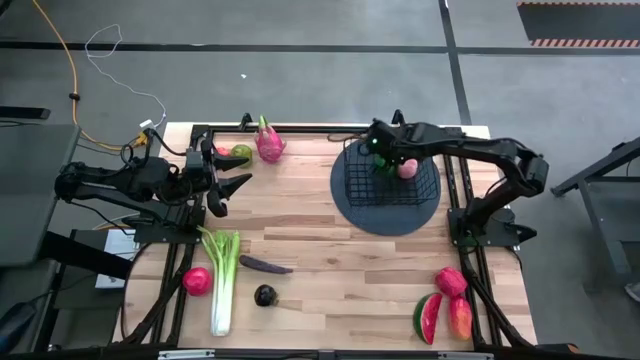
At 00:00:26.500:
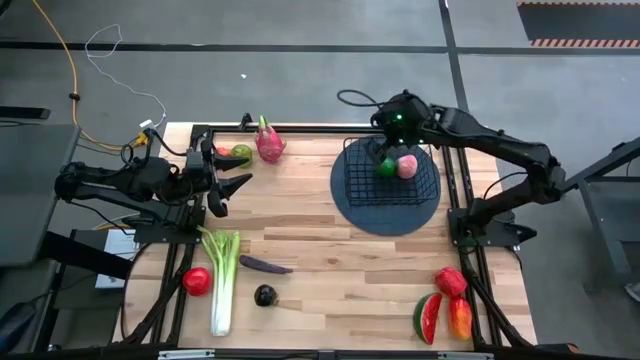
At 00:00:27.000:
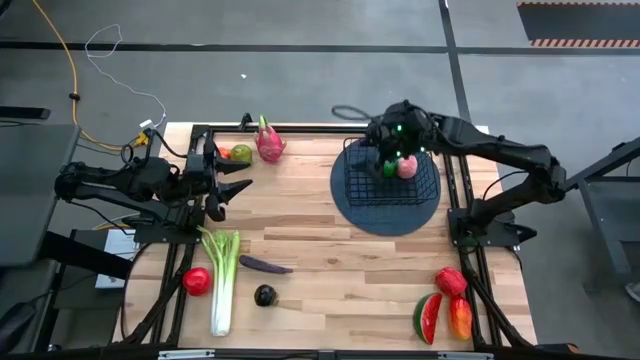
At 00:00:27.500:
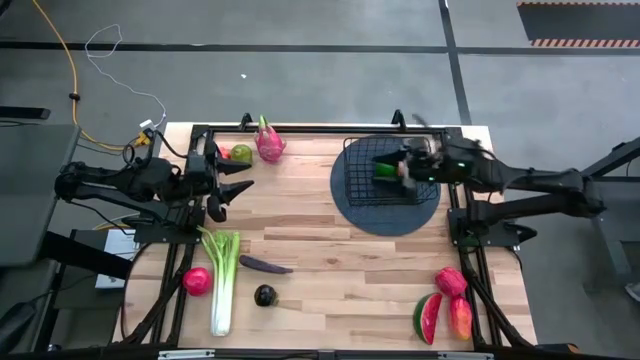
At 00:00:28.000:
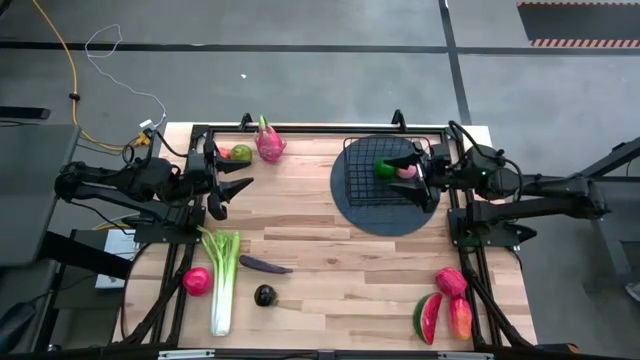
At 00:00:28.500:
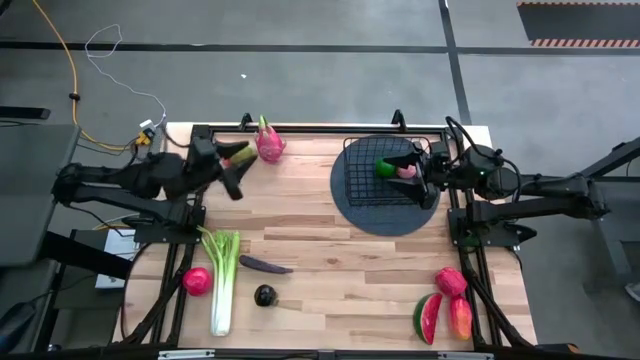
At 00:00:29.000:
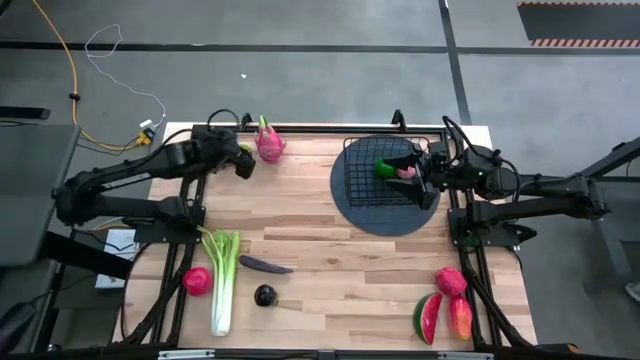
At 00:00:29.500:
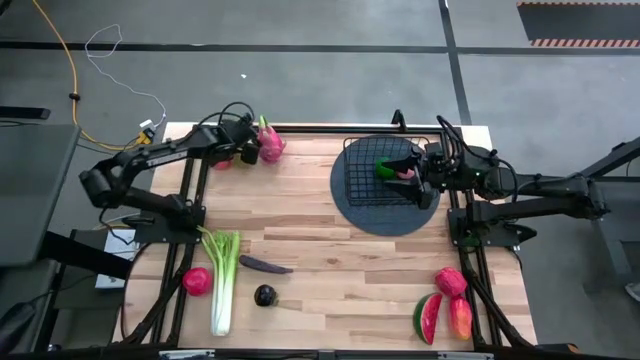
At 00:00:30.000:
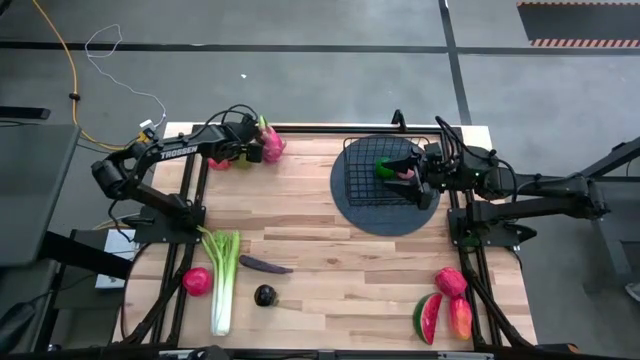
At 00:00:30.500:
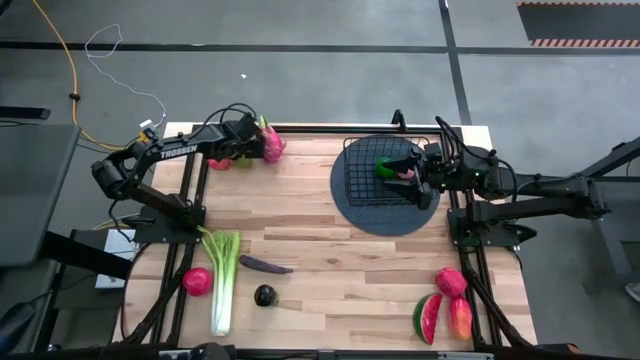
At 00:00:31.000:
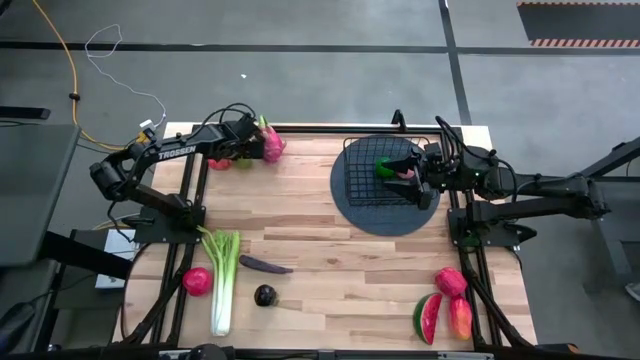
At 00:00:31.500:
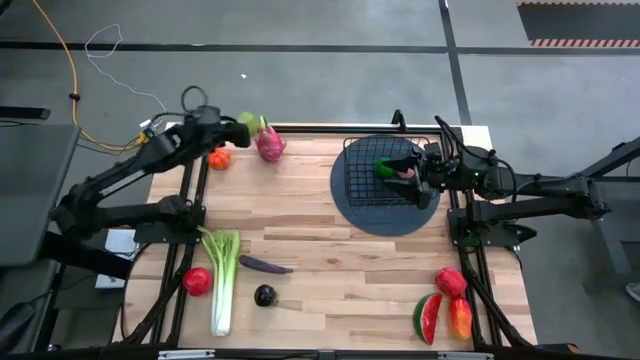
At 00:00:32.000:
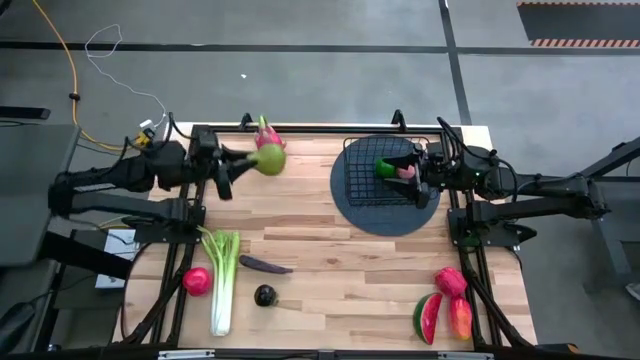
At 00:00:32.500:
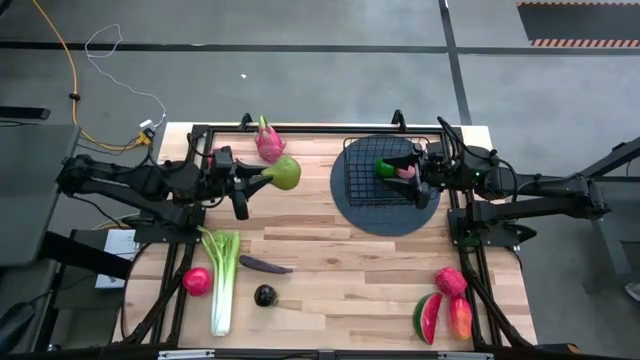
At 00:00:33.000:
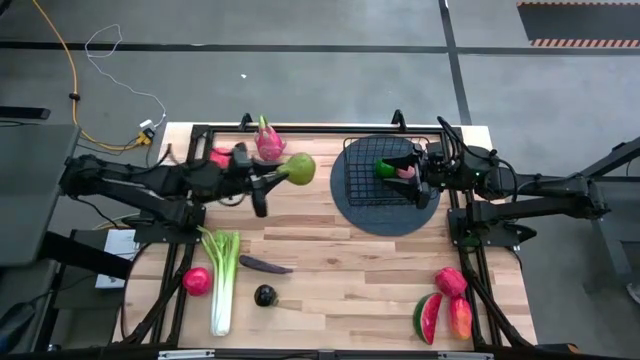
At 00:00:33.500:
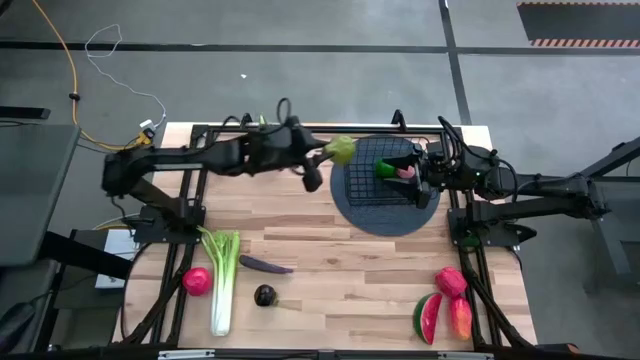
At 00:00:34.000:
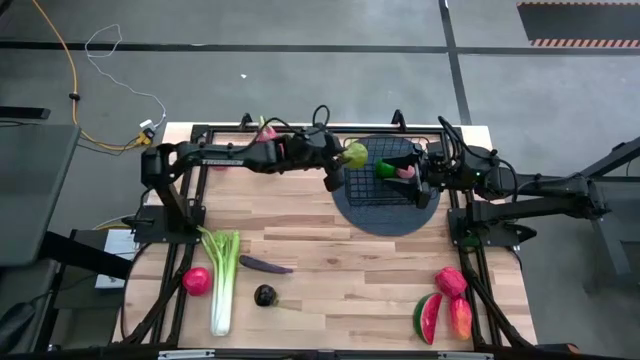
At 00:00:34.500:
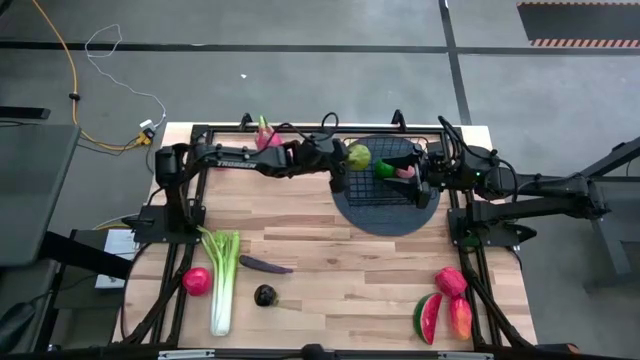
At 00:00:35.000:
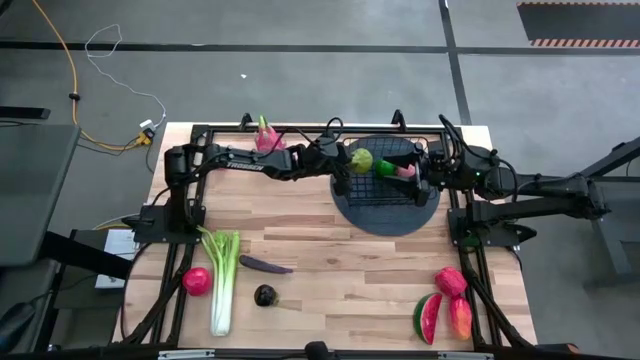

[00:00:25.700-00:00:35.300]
Task: Build produce basket
Put the pear into the wire basket

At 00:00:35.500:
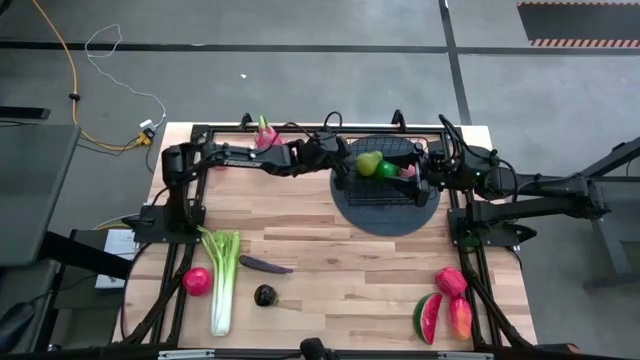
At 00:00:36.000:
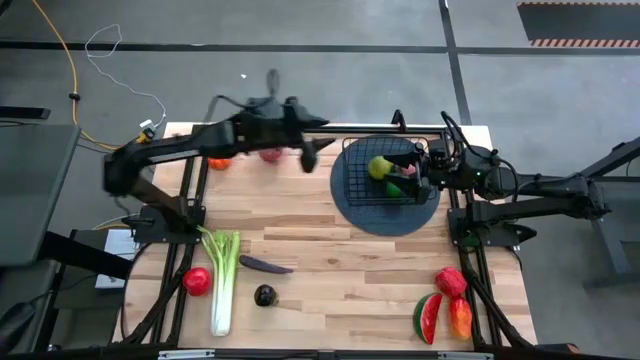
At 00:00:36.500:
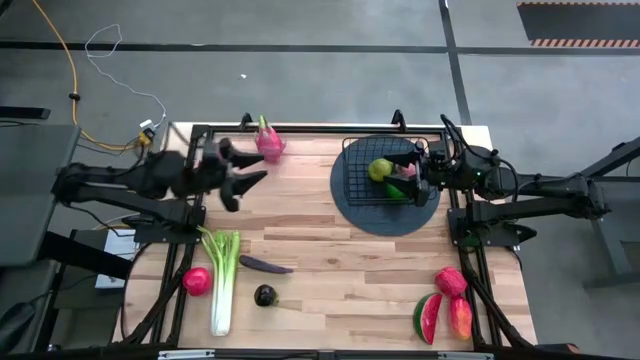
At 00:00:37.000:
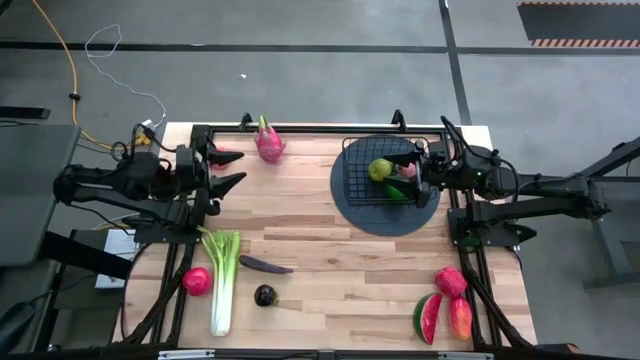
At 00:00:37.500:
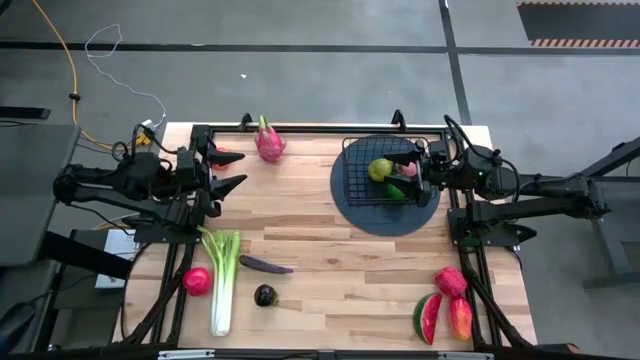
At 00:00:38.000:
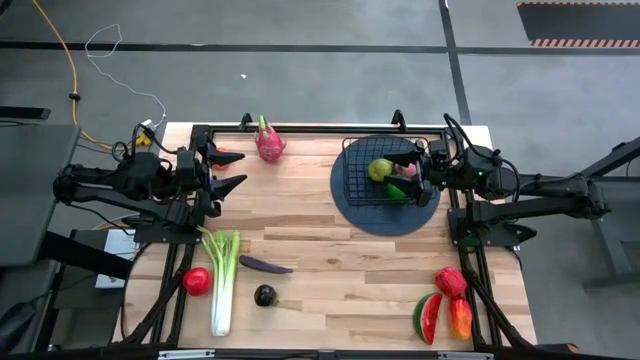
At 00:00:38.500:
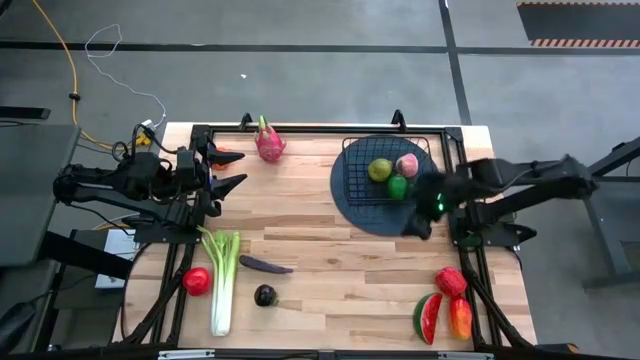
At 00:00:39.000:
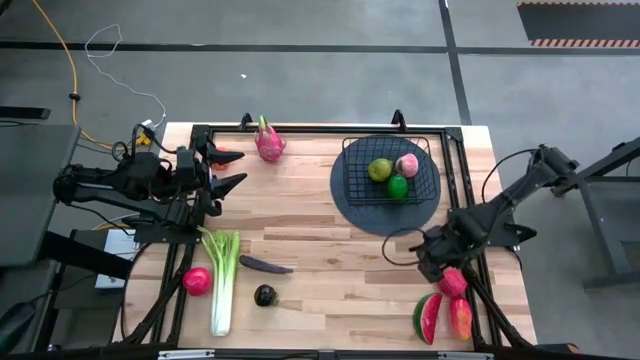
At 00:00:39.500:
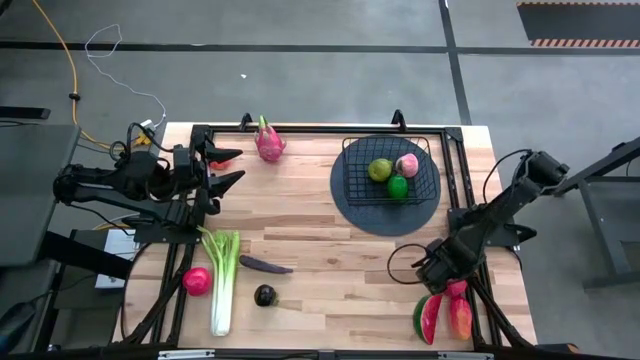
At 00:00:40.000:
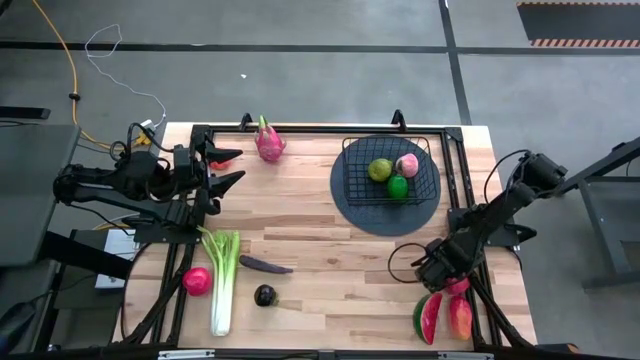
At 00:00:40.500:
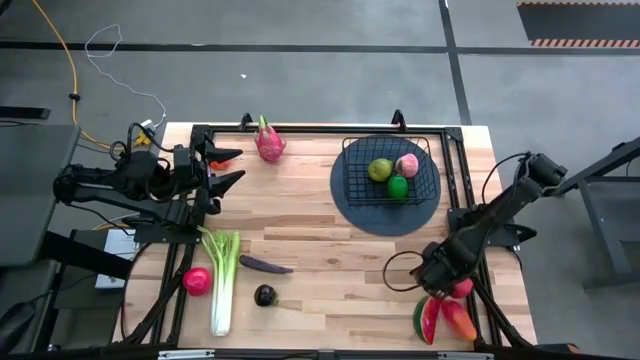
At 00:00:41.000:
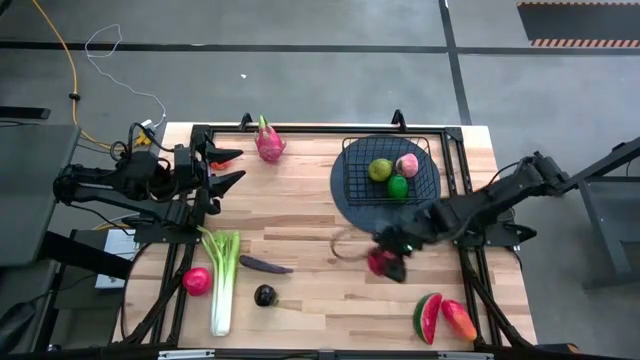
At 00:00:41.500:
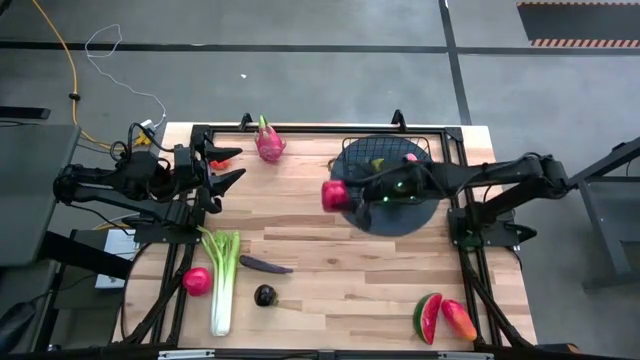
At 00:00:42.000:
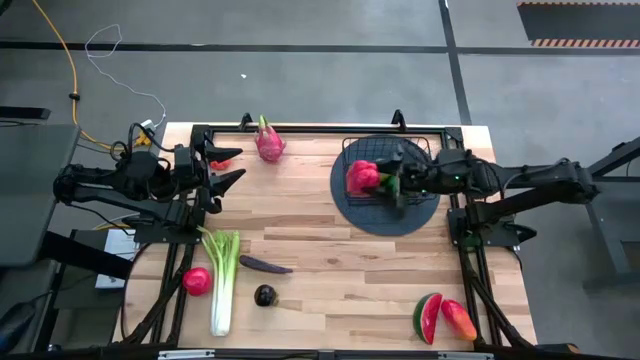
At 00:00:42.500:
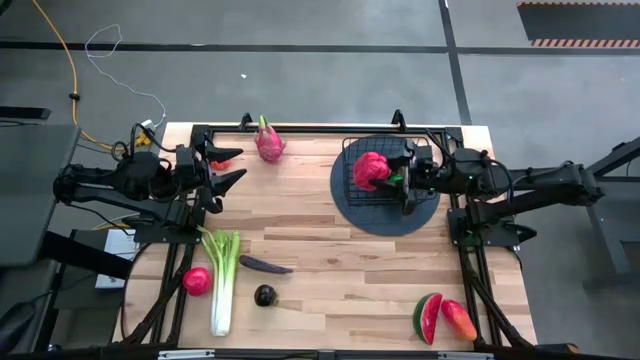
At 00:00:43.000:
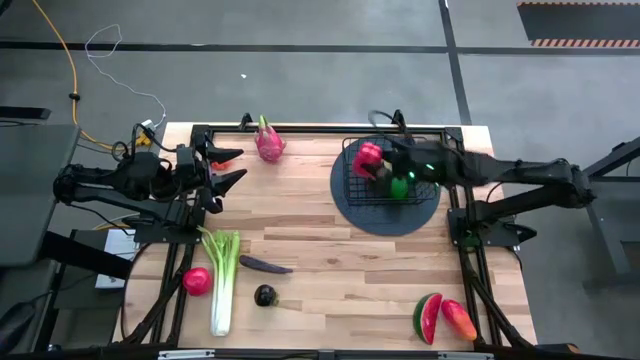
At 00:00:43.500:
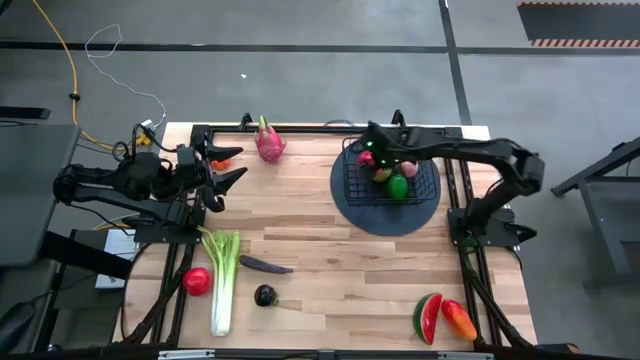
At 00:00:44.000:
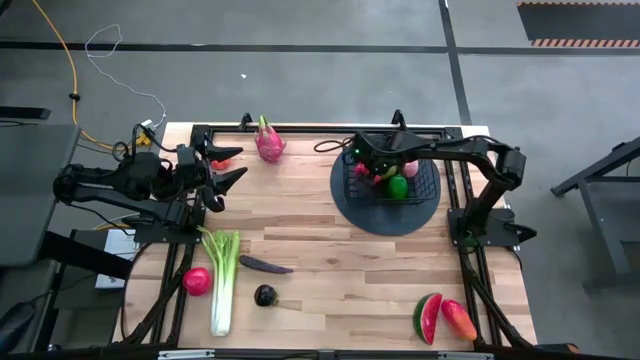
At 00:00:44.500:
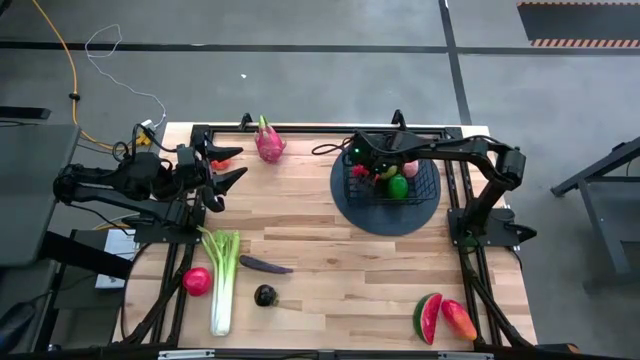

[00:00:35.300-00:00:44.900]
Put the bell pepper into the wire basket

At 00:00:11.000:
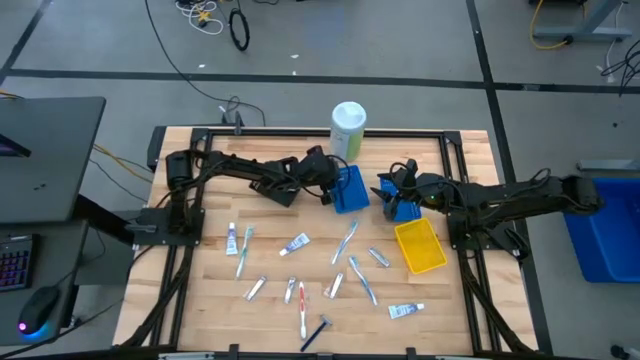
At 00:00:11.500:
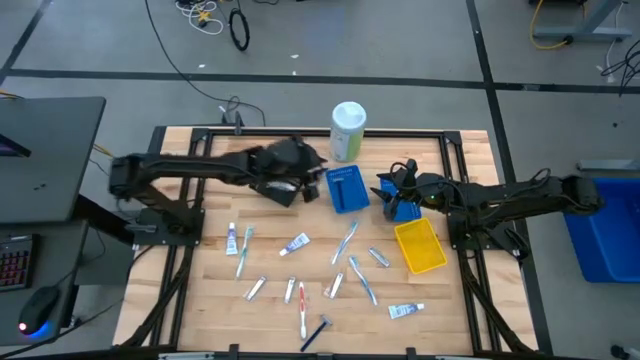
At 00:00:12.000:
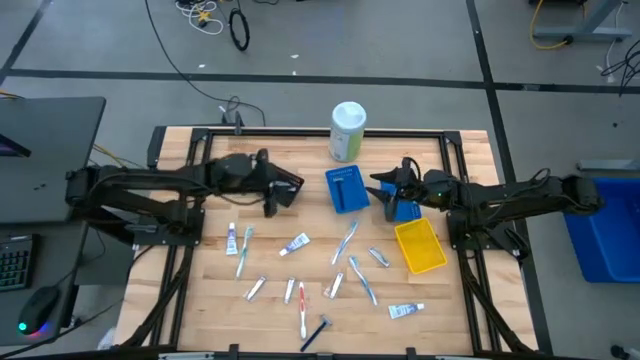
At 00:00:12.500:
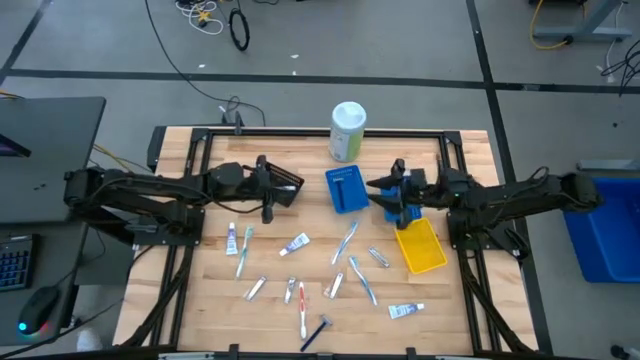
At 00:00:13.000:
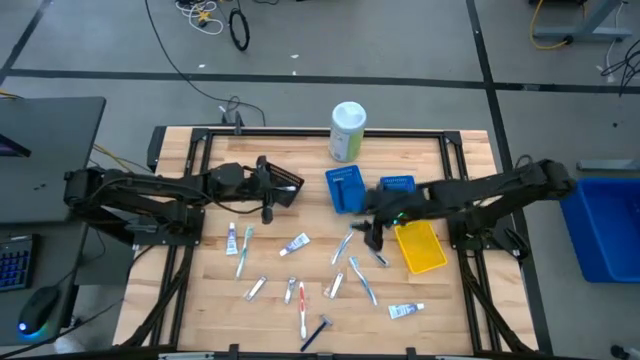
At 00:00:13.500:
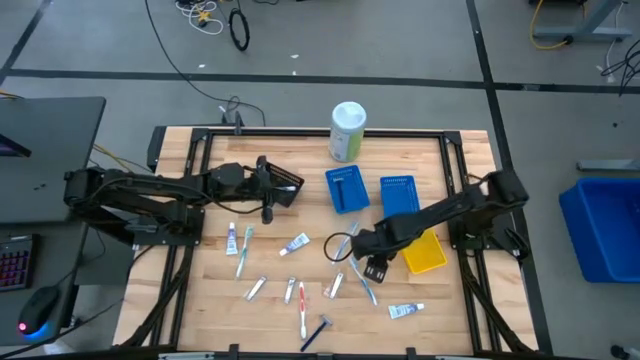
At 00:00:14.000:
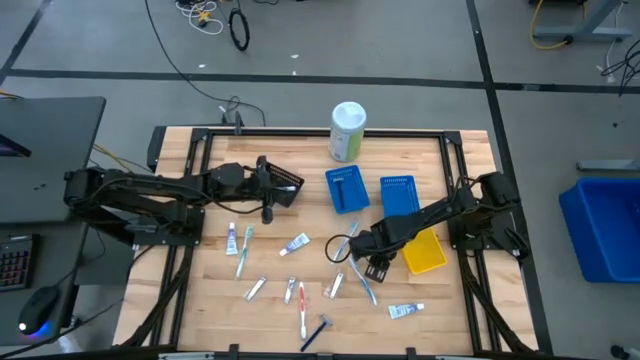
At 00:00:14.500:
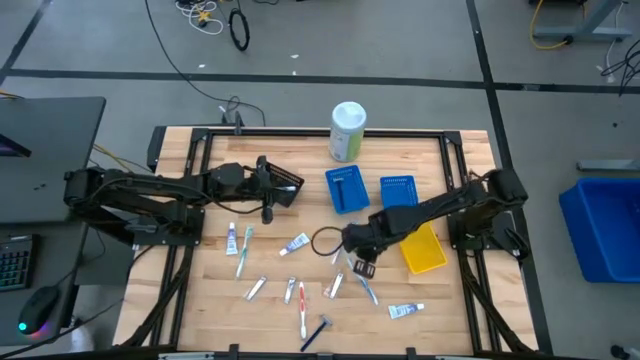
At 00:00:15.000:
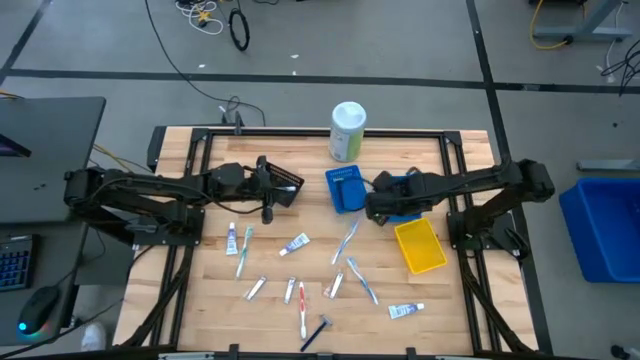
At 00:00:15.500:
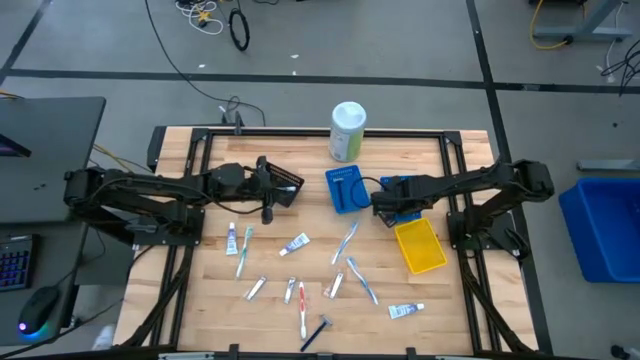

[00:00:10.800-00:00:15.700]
Task: Pick & Place Travel size toiletries
Put the nail cutter into the right blue basket
